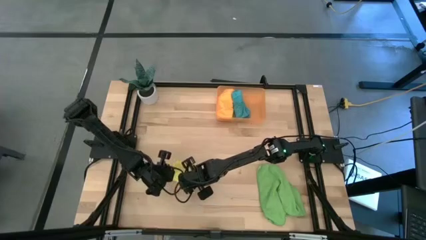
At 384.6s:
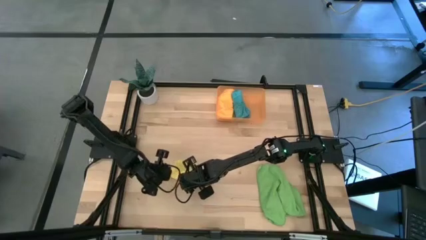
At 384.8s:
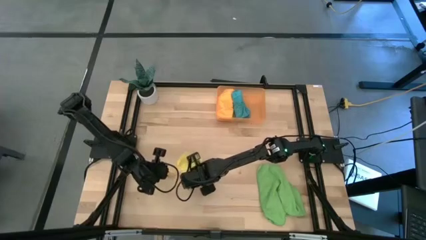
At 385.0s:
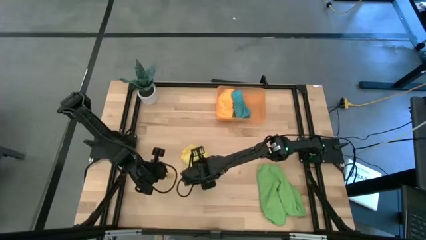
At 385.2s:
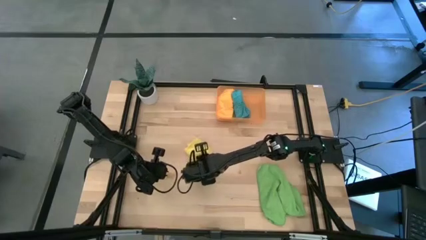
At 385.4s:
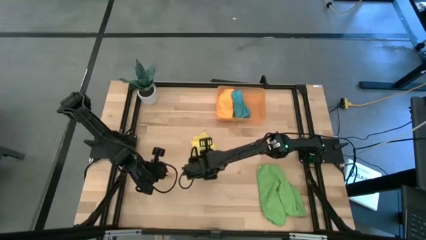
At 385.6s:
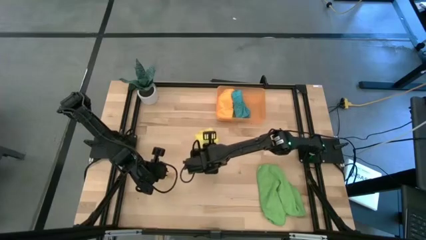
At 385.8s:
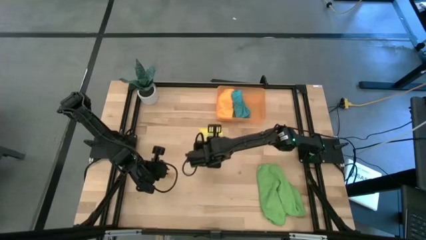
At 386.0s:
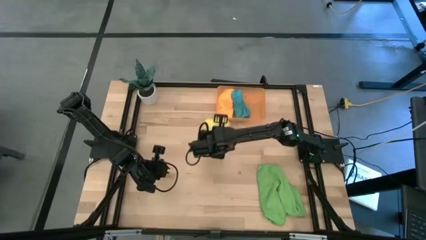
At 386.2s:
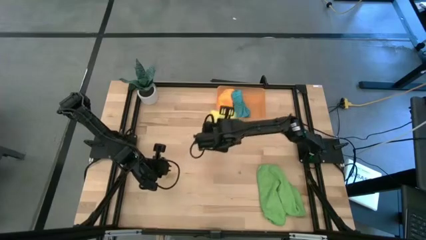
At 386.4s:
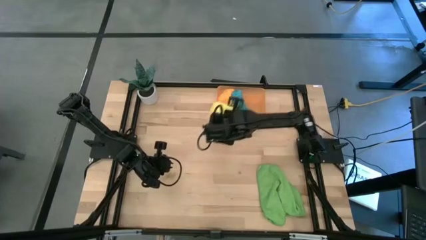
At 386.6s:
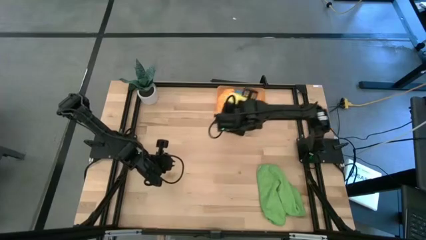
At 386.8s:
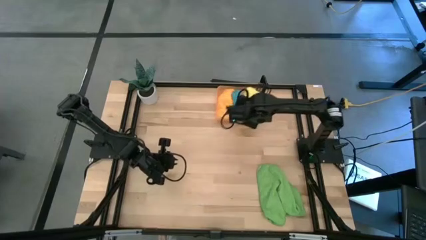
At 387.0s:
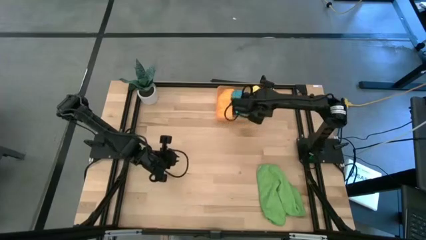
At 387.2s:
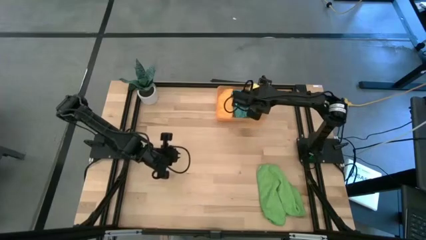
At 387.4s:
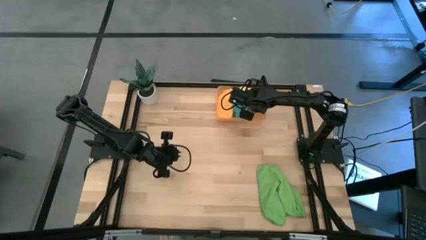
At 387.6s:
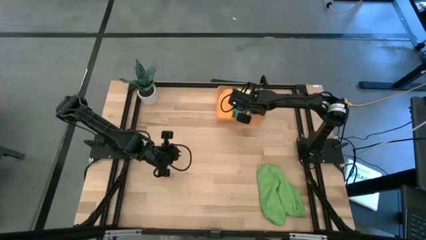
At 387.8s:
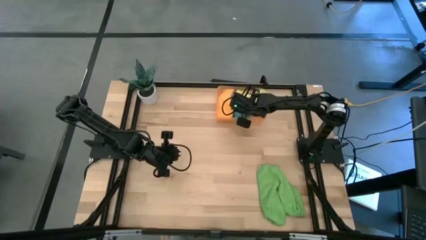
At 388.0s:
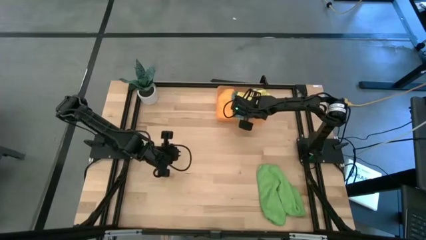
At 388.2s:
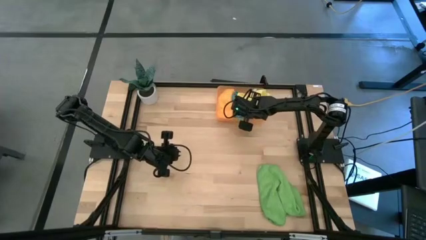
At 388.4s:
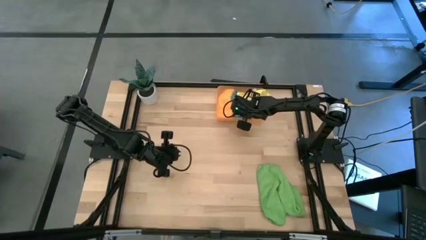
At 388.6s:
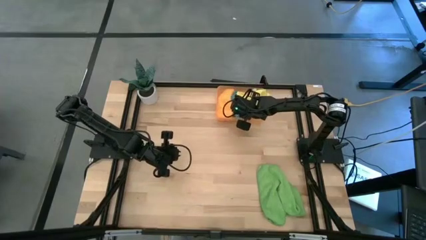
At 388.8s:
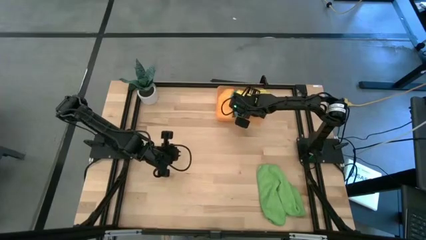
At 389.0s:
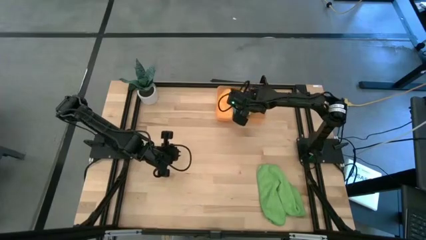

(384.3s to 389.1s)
Task: Roll microfiber towels into tight, uniform cylinder then place into a basket
Put the yellow microfiber towel into the bin

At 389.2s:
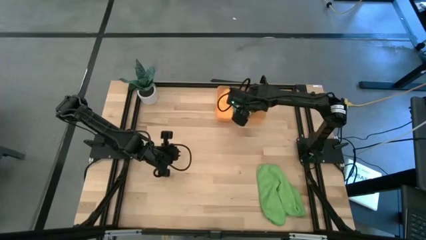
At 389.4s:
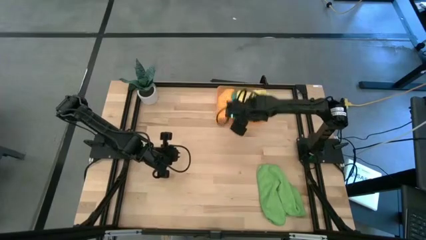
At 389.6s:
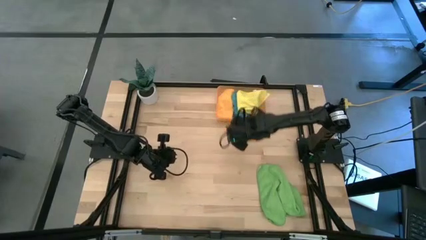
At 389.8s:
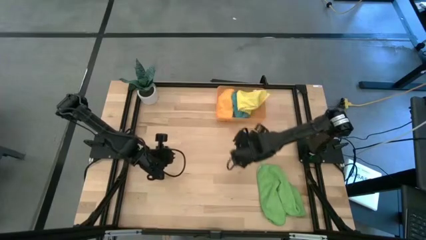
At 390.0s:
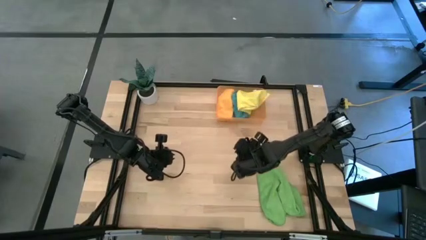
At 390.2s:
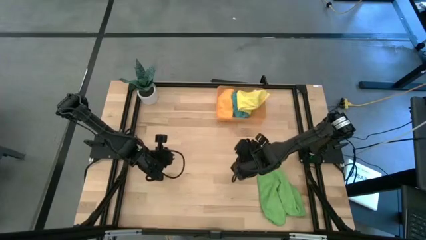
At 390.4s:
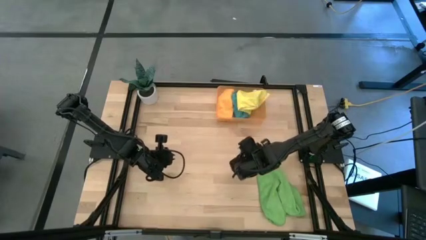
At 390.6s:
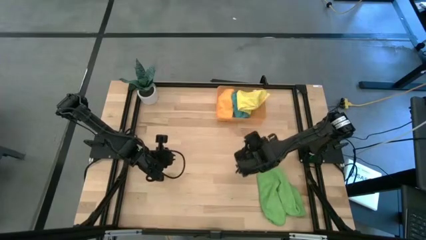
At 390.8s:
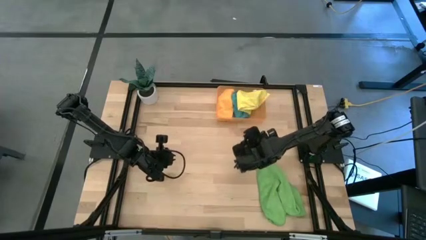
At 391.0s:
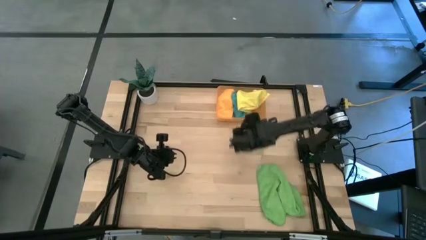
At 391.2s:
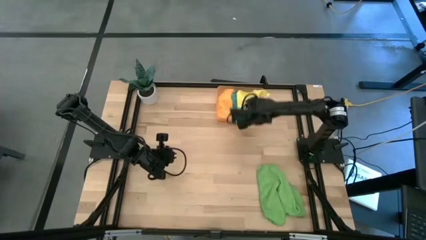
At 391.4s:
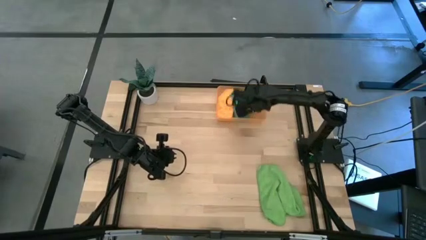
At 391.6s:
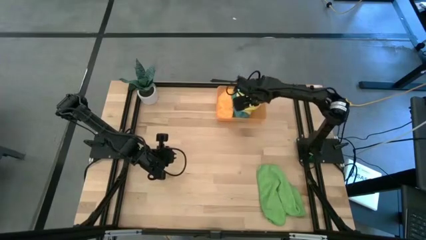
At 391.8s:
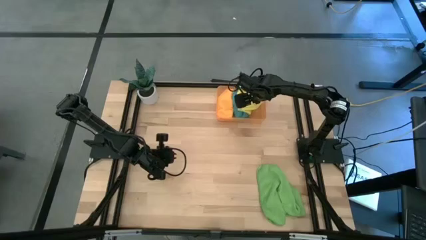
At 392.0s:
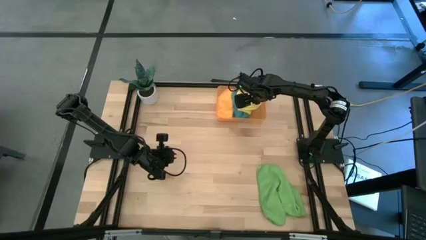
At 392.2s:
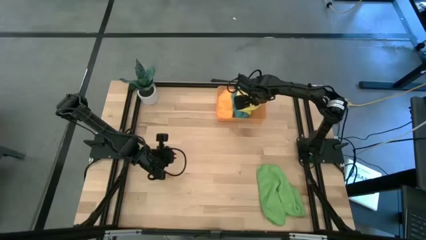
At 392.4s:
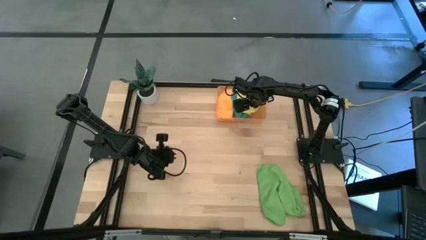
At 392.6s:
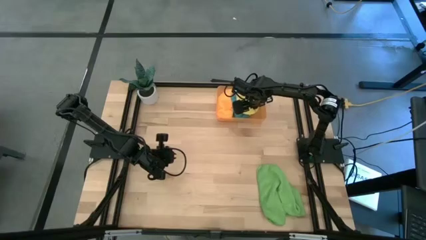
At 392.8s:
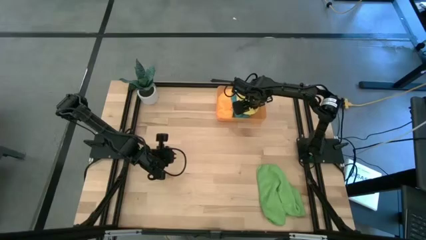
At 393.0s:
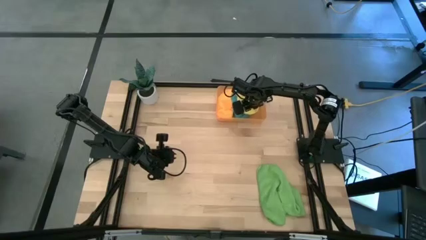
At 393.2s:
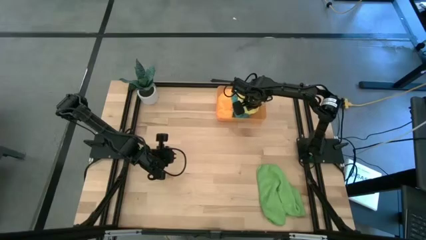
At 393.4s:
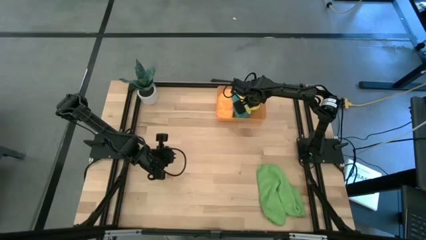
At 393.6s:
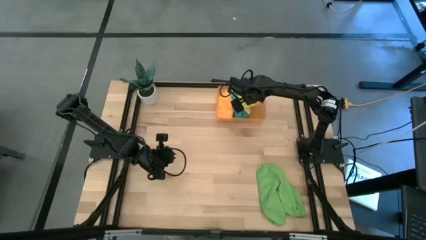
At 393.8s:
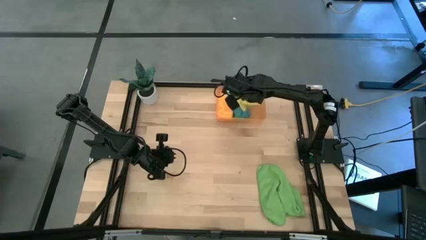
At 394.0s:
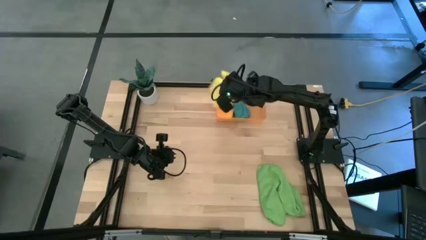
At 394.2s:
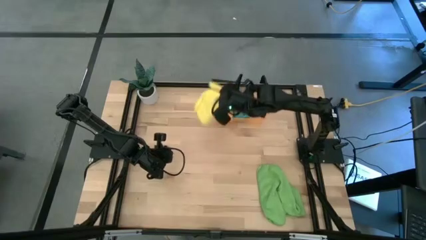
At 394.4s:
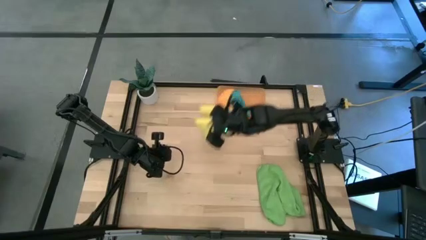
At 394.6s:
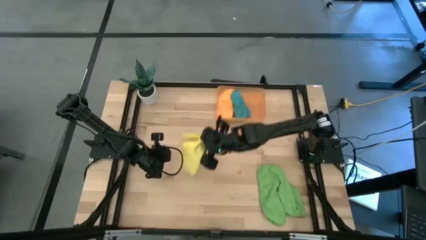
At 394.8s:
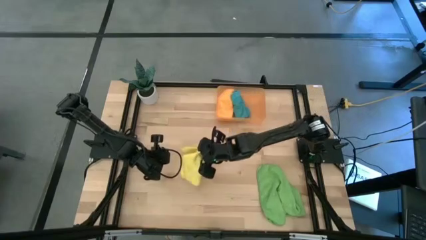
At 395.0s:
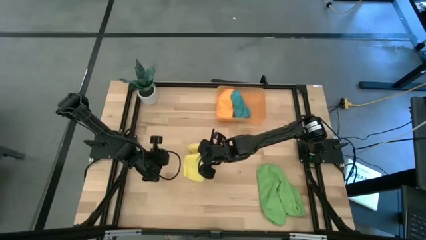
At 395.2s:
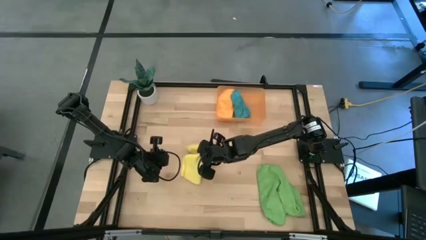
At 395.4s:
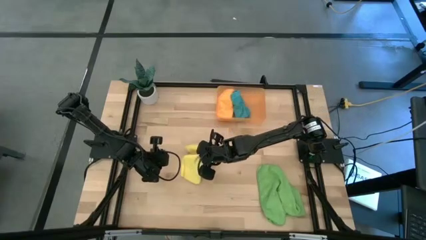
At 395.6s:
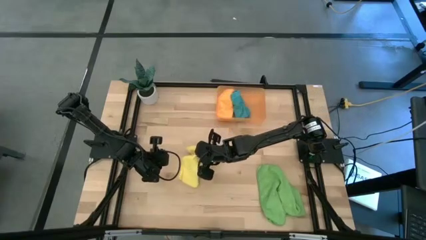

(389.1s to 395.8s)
Remove the yellow microfiber towel from the bin

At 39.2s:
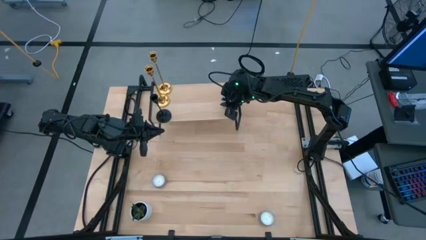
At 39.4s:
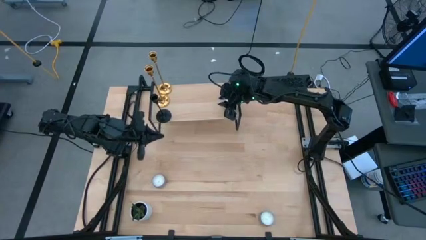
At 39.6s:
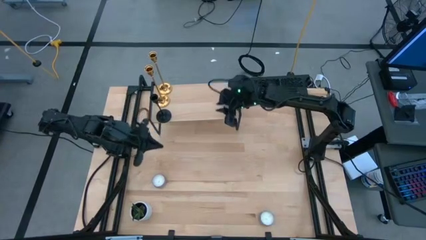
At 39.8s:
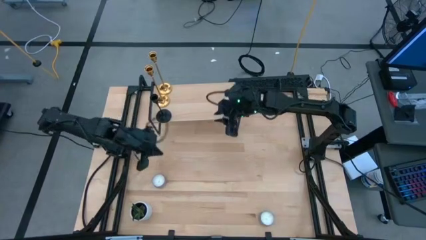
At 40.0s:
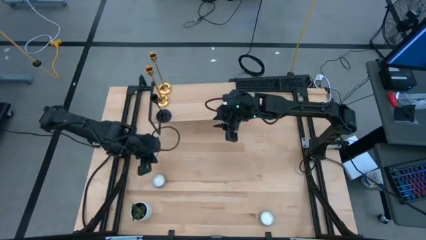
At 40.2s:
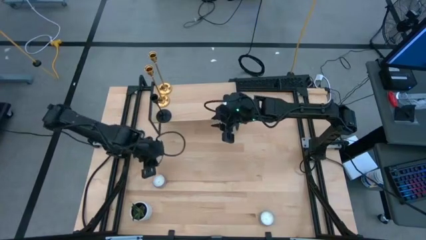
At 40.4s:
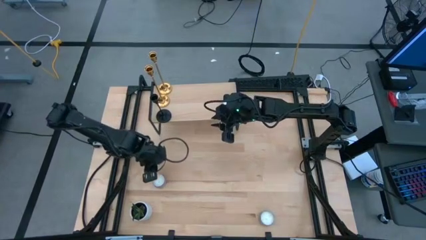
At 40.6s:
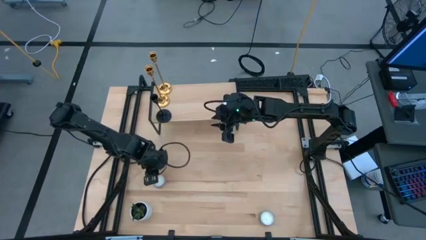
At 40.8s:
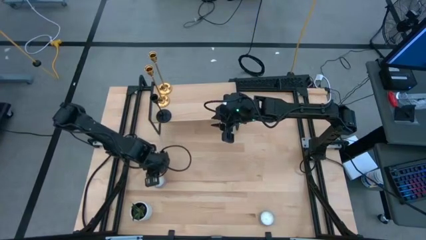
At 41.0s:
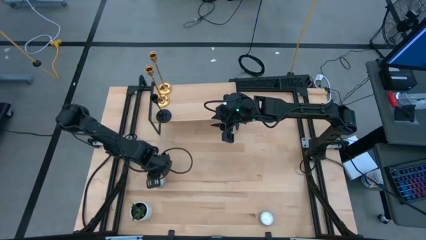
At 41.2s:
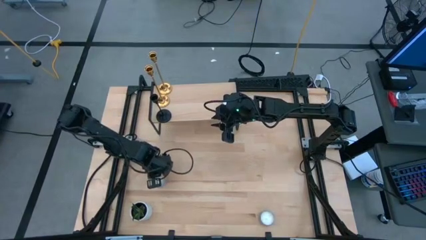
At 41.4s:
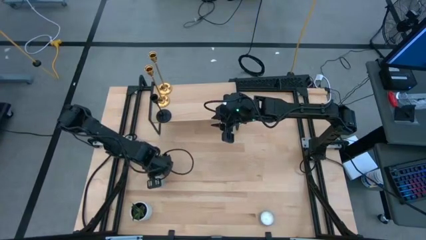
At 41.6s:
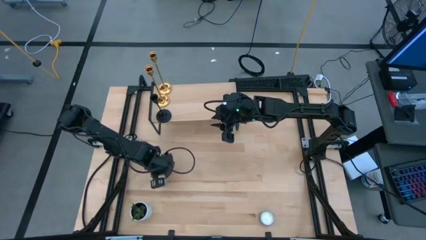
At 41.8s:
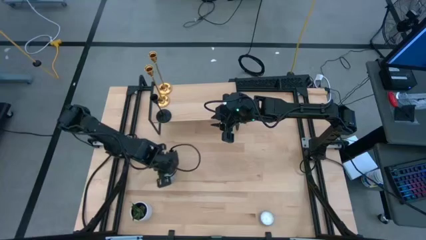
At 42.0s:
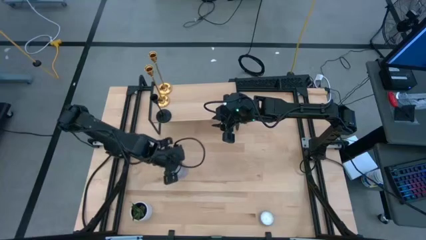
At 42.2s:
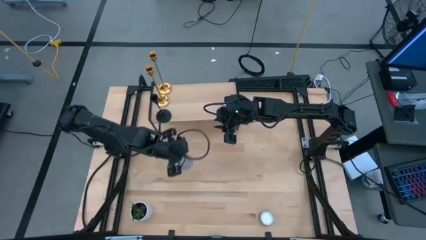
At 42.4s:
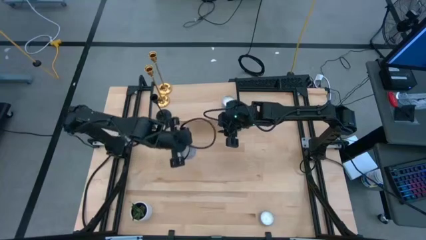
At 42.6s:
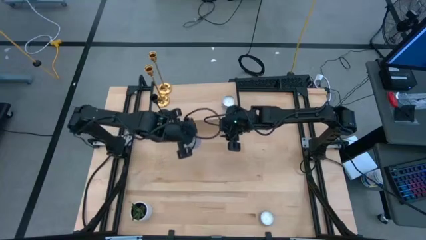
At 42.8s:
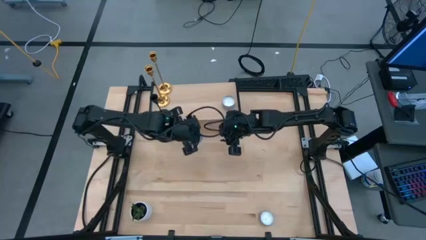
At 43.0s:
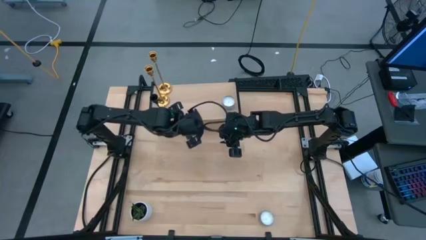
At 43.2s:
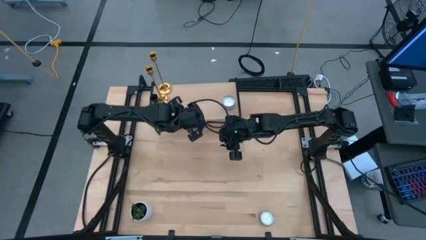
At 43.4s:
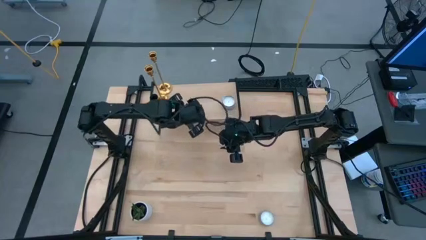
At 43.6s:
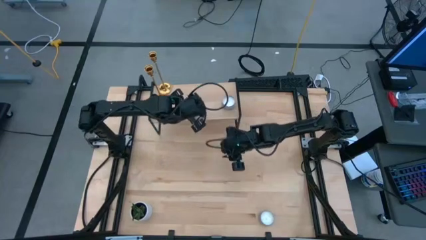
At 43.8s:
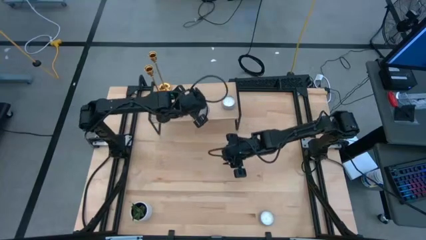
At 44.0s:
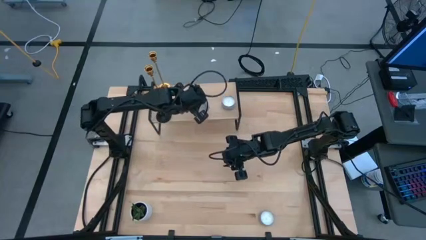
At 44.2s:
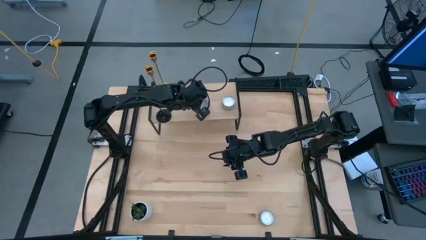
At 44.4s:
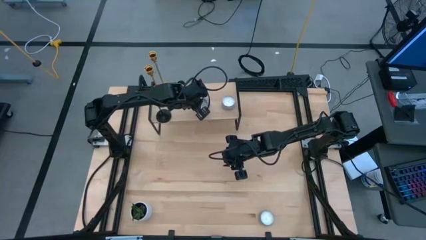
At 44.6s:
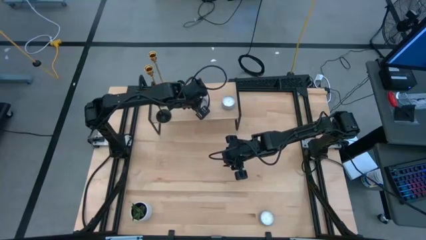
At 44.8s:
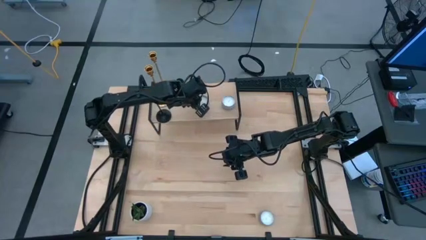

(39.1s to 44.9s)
Task: Pick & Place candle stick holders
Put the purple white candle bottle on the shelf
